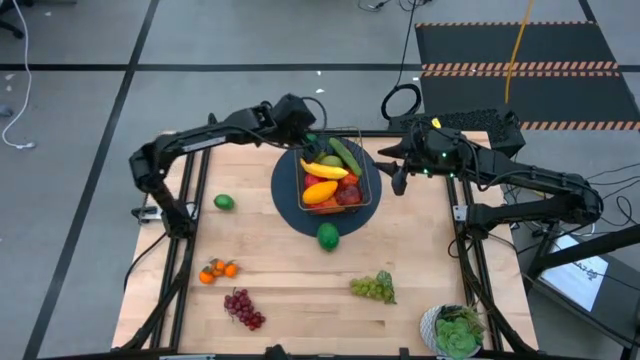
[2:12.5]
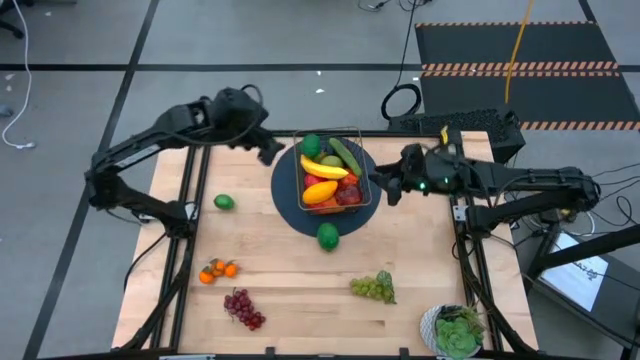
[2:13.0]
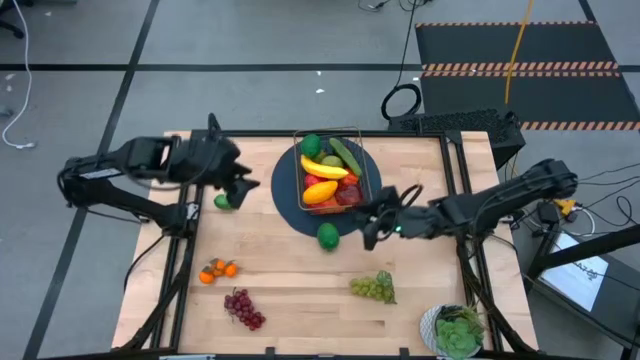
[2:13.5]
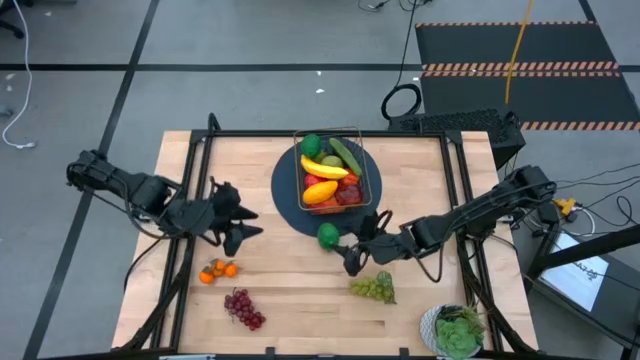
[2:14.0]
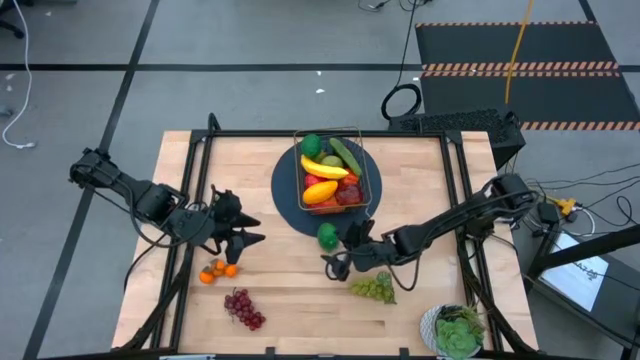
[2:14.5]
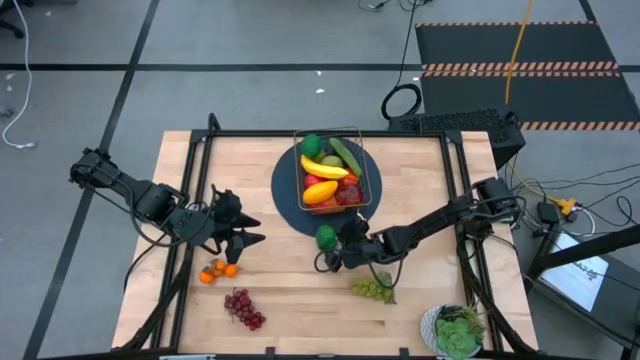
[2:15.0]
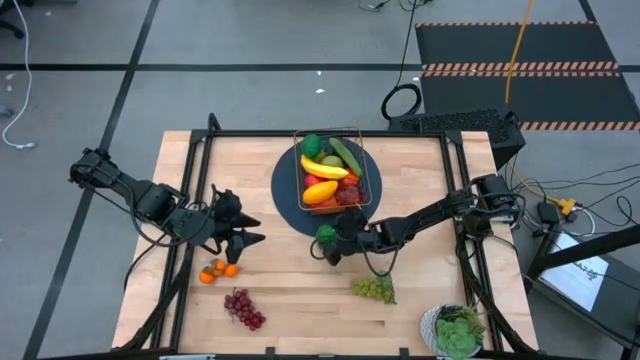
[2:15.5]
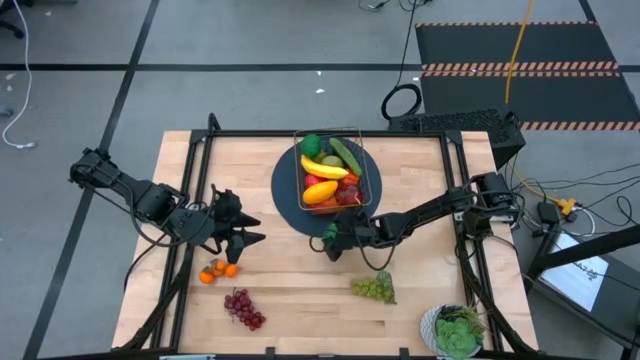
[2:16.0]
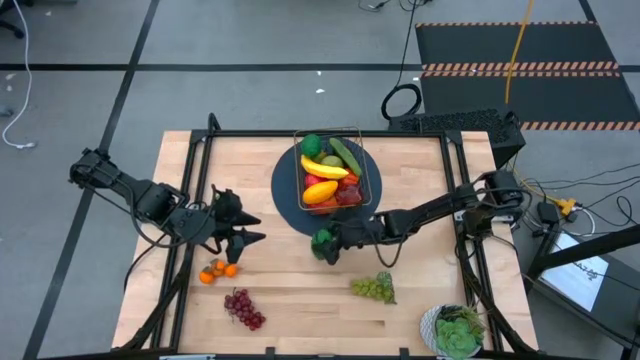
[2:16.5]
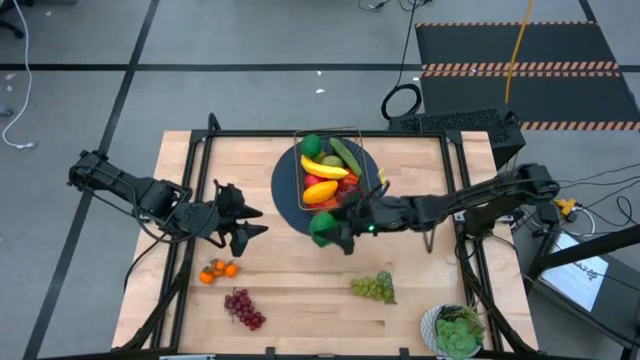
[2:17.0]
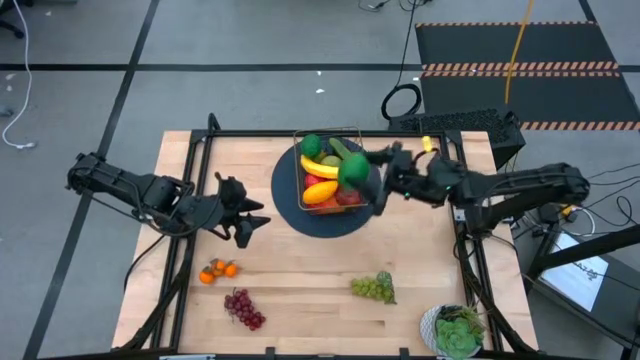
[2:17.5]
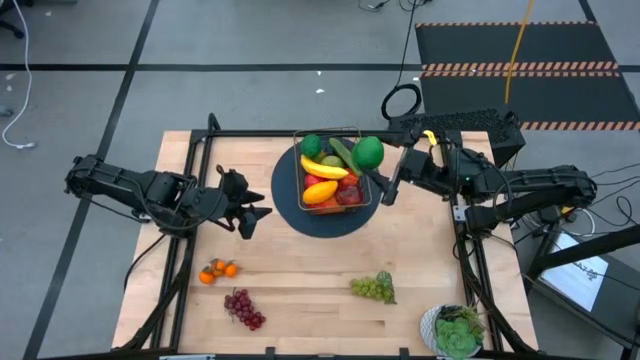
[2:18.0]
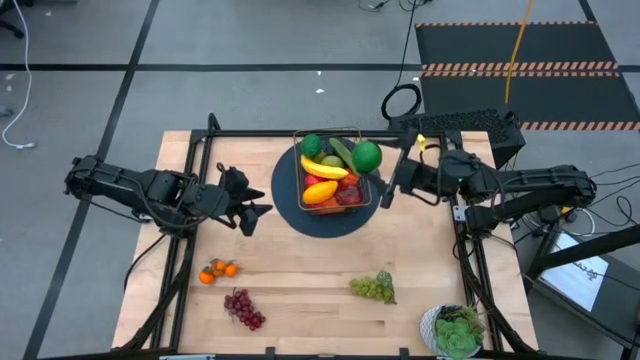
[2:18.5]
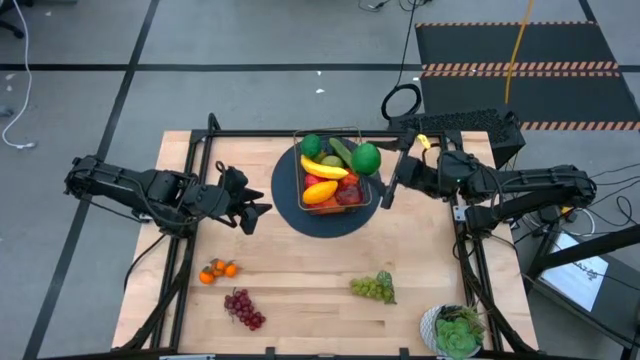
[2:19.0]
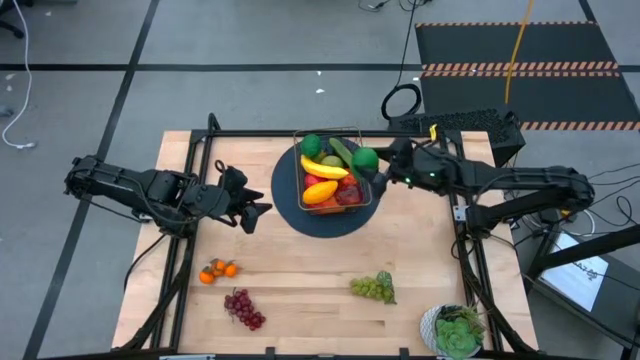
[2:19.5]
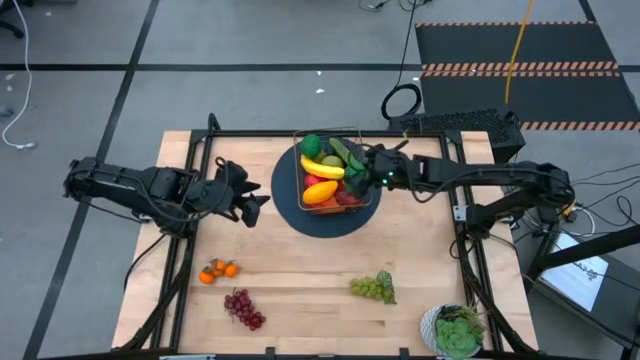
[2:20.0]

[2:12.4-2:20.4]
Task: Build produce basket
Put the bottom green lime into the gold wire basket

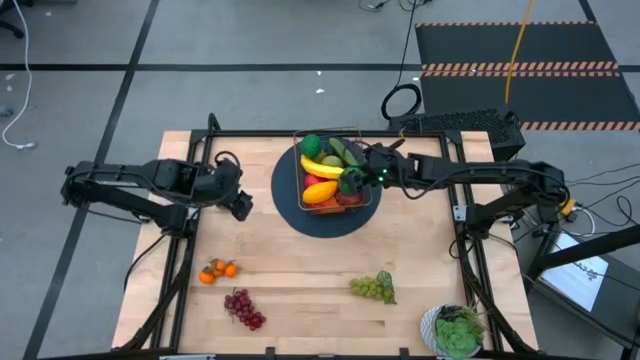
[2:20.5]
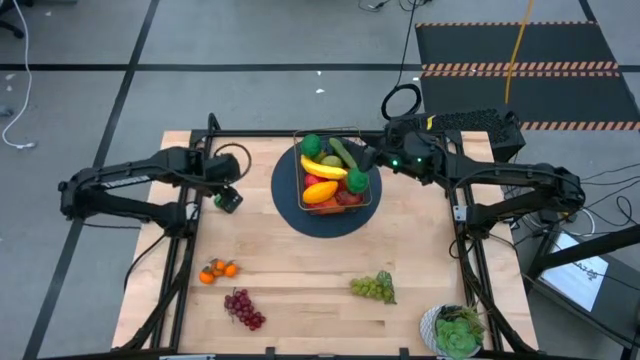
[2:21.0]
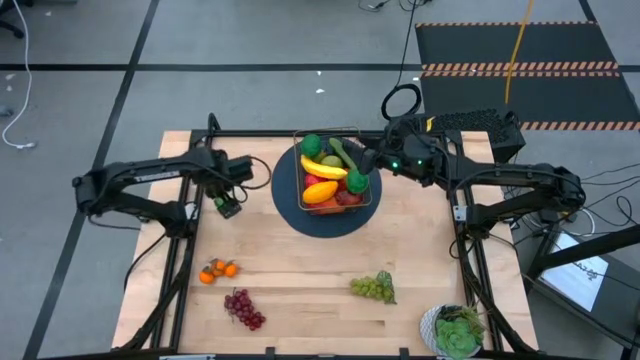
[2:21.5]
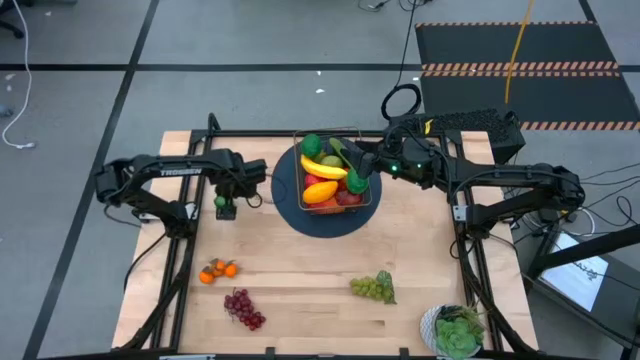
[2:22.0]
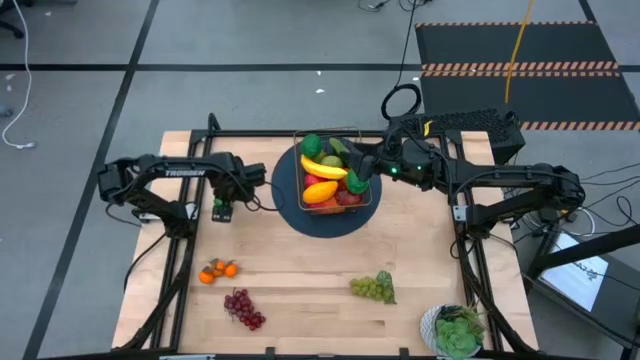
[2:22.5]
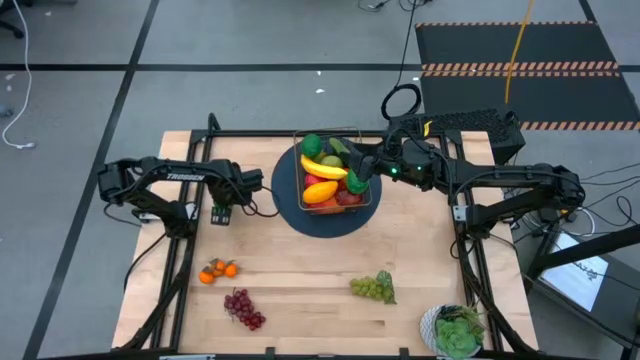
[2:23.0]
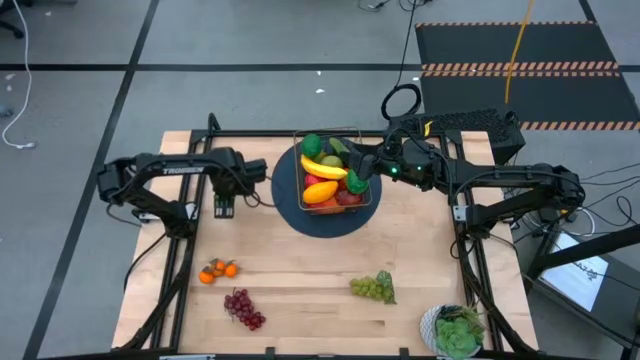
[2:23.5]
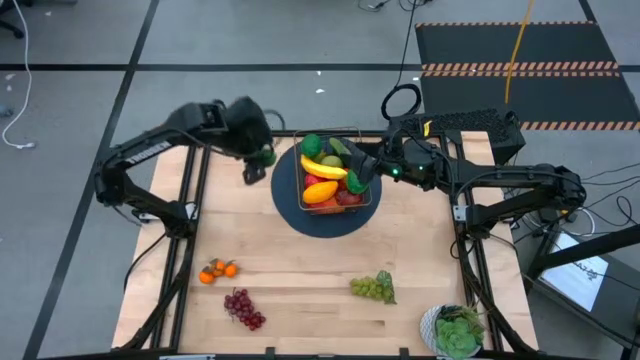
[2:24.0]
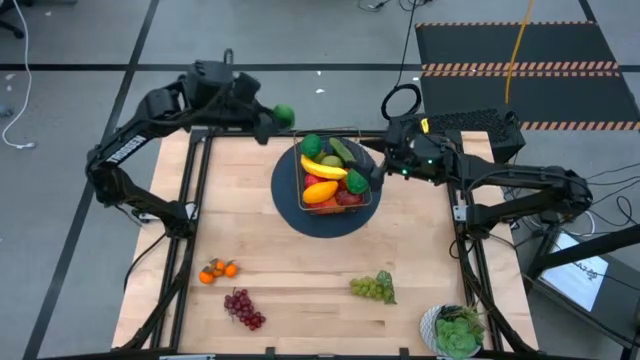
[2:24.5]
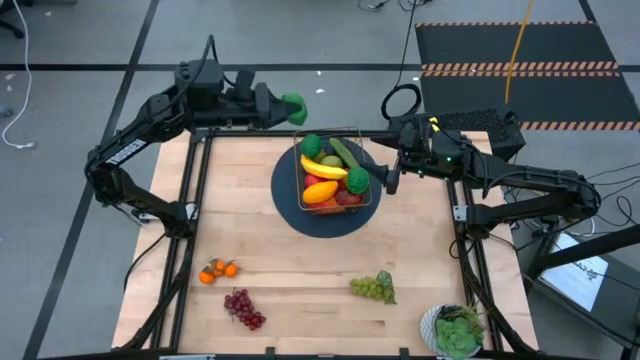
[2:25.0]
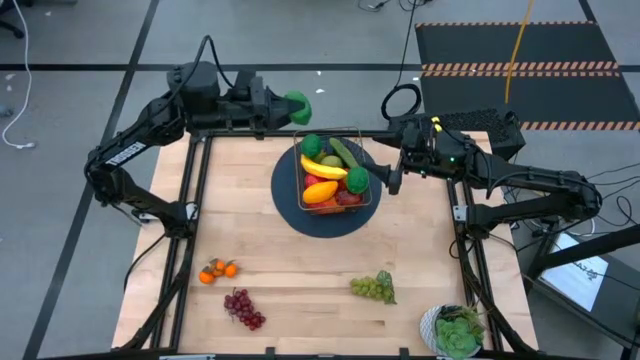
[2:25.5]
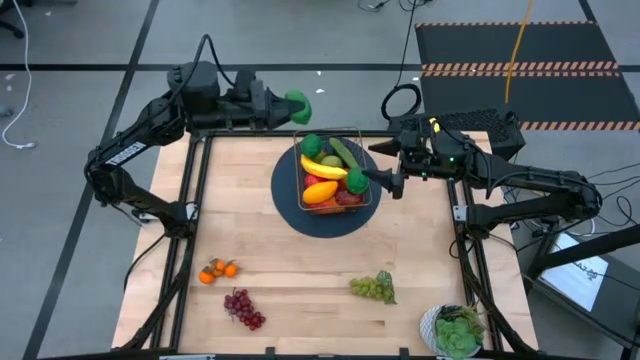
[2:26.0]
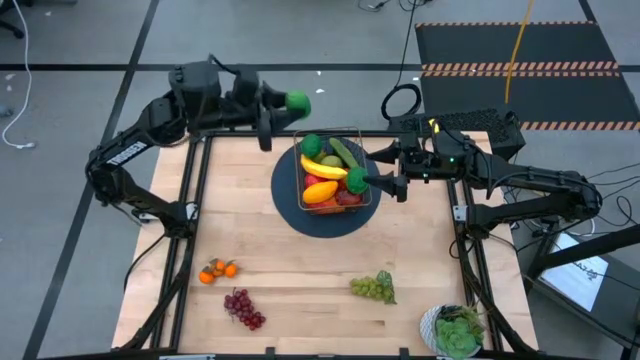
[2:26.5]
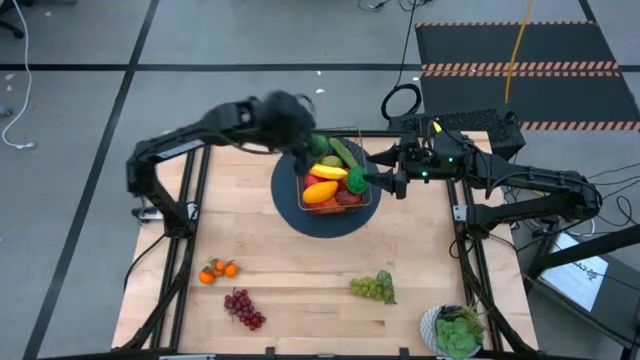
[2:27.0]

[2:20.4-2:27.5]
Put the green lime into the gold wire basket

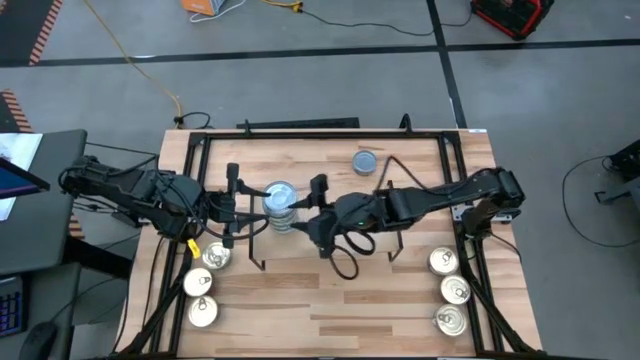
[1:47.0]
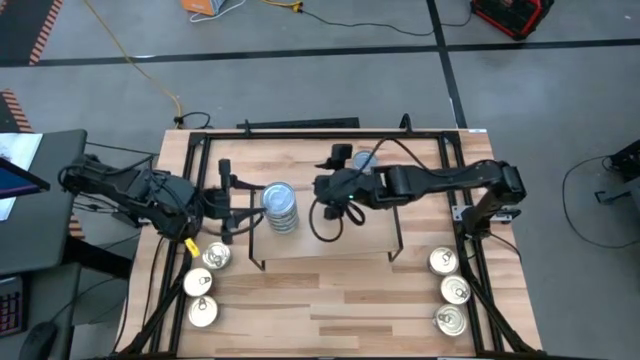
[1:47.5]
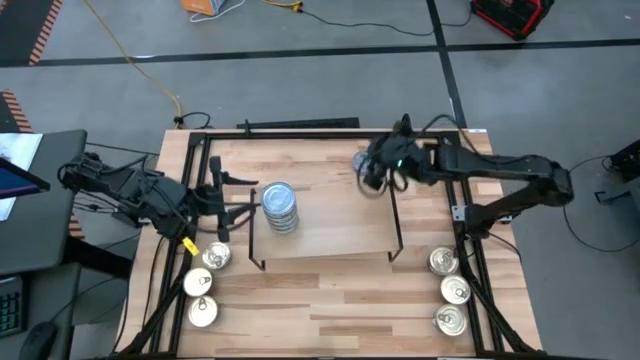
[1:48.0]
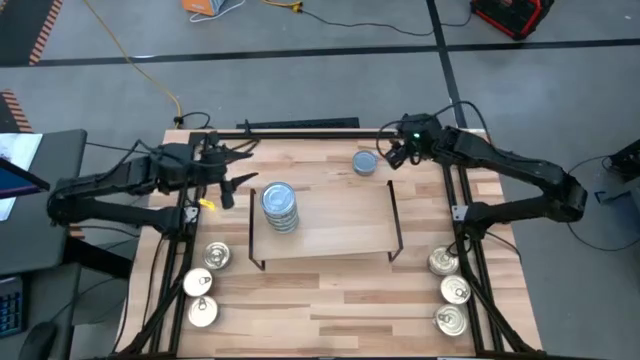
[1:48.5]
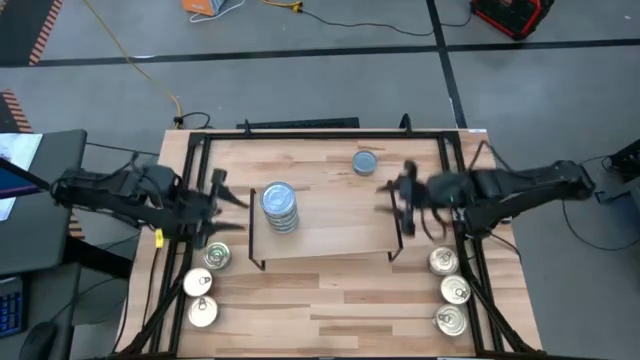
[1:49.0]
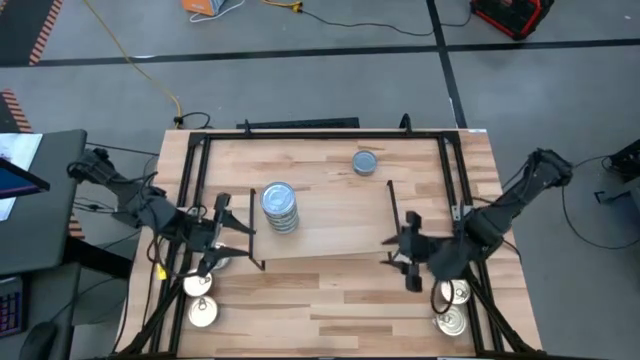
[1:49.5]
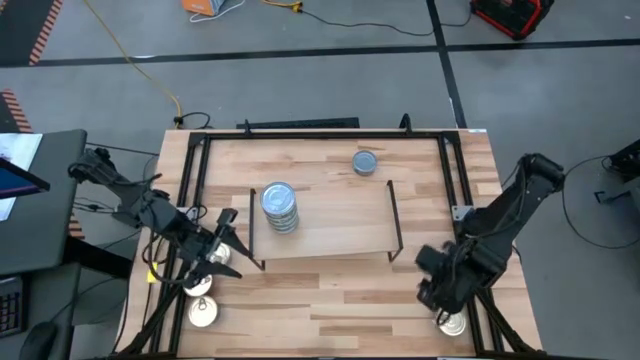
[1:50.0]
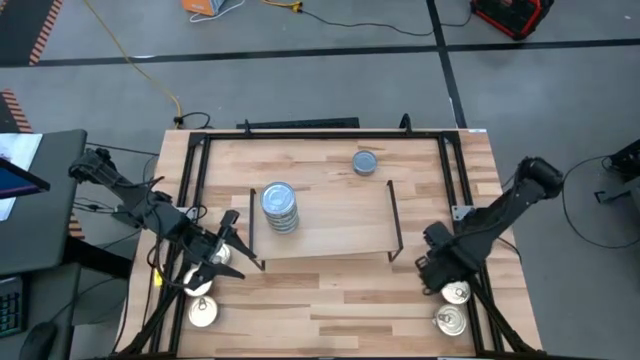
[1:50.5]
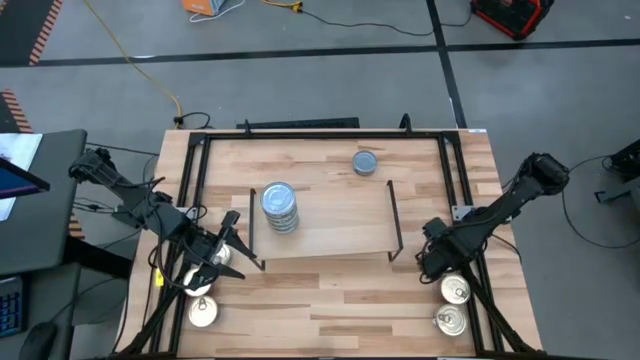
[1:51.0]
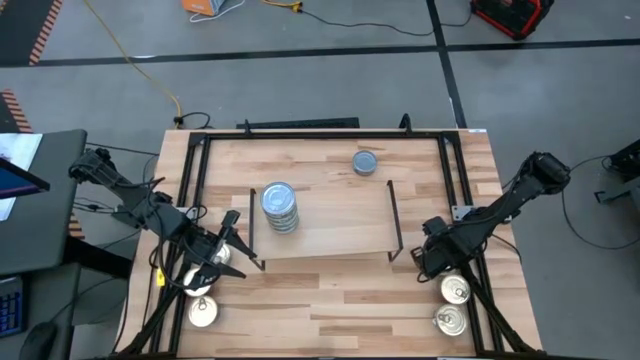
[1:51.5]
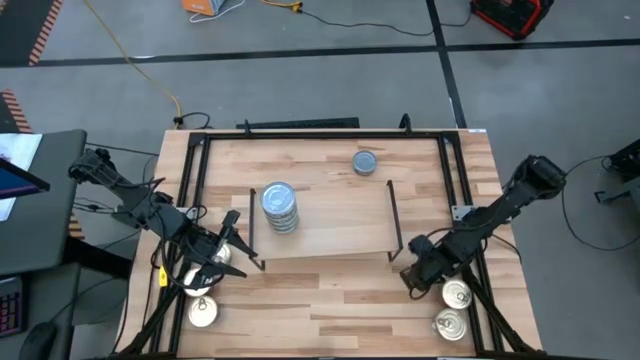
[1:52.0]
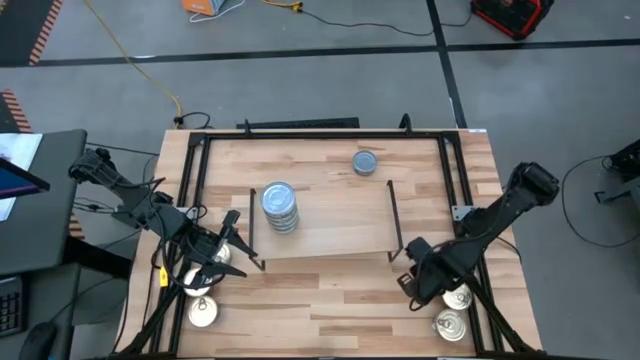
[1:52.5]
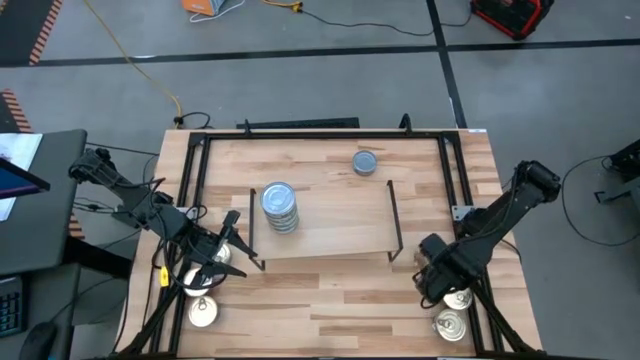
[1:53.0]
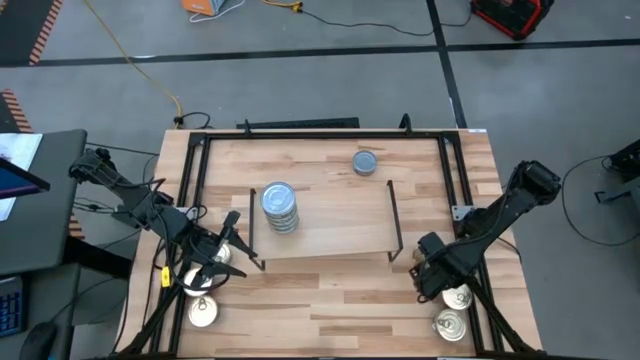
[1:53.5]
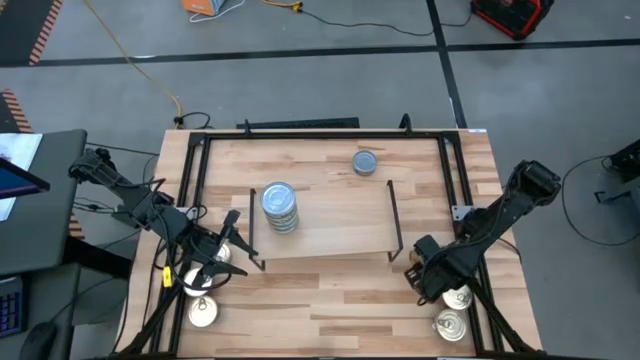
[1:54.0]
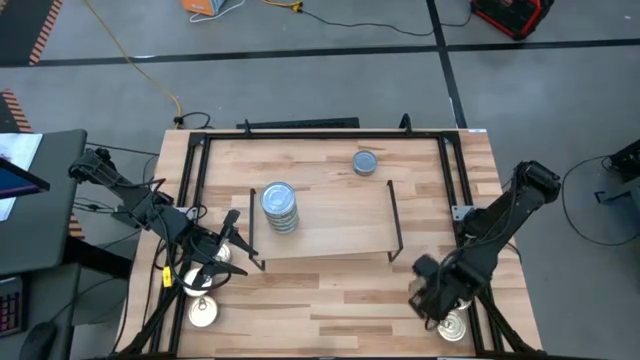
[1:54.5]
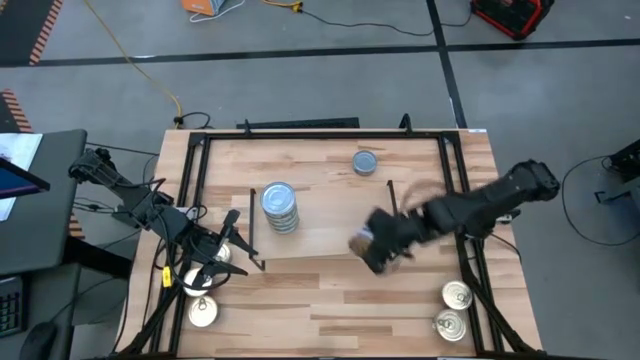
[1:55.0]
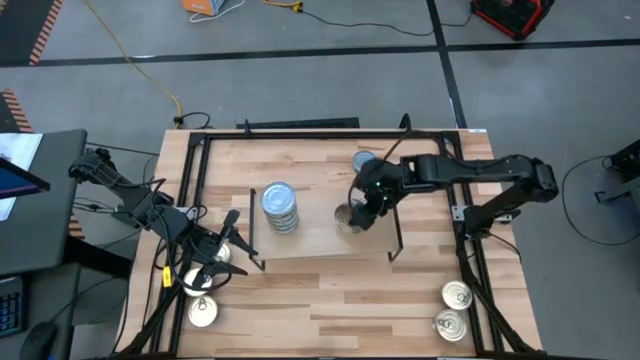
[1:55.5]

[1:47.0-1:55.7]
Task: Stack canned seafood by type on shelf
Put the blue tuna can on the shelf
